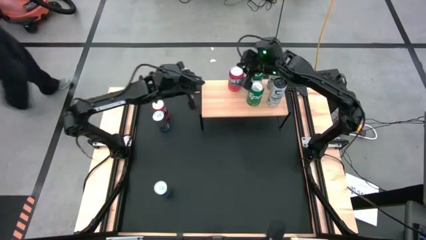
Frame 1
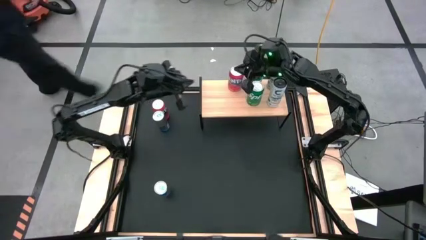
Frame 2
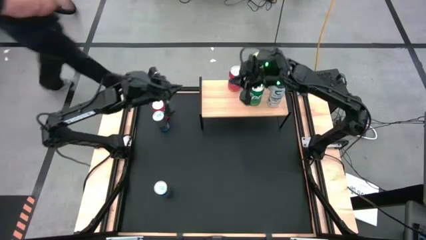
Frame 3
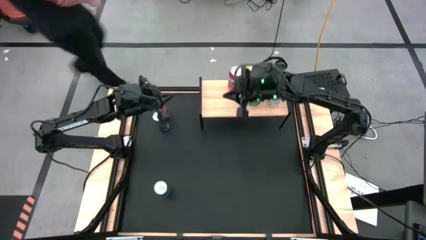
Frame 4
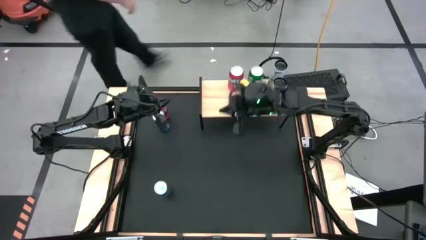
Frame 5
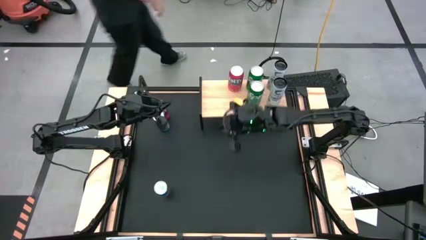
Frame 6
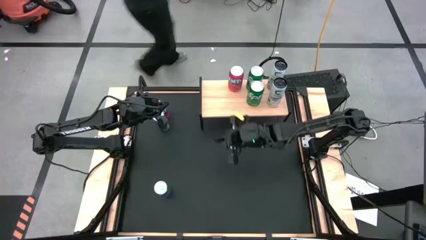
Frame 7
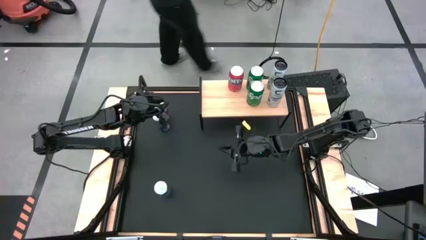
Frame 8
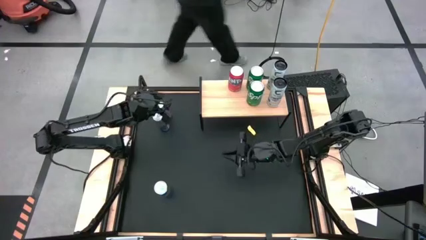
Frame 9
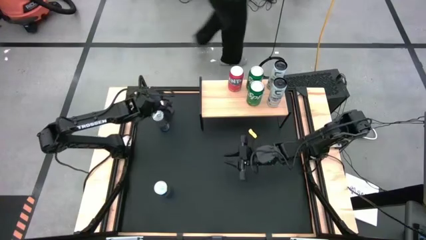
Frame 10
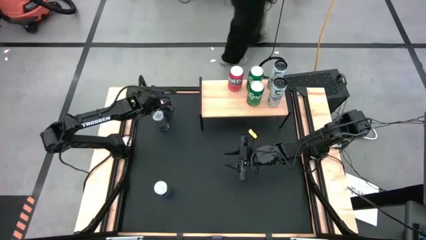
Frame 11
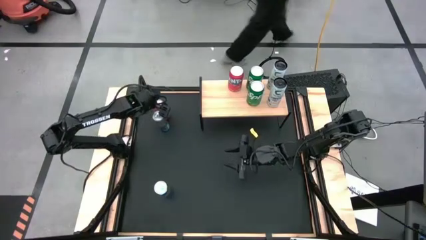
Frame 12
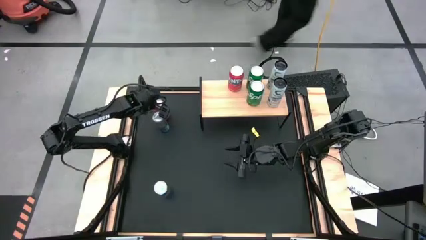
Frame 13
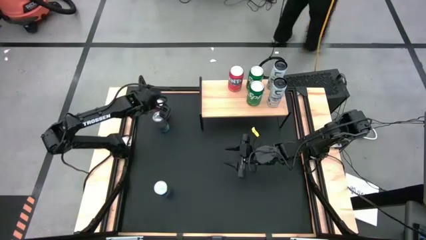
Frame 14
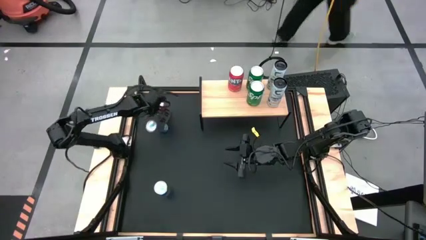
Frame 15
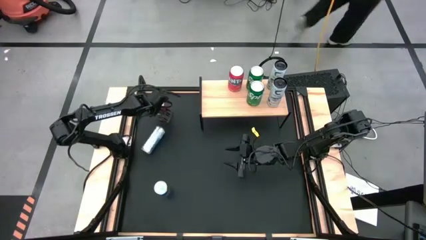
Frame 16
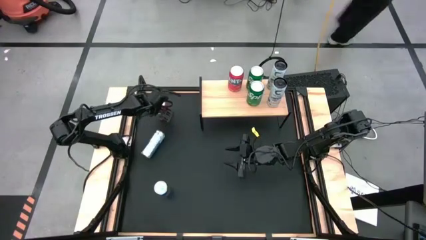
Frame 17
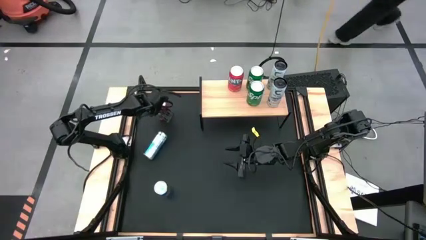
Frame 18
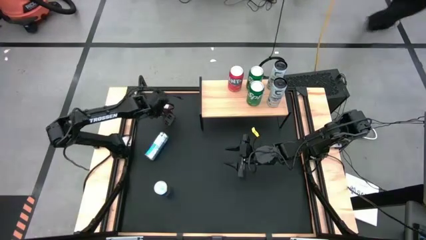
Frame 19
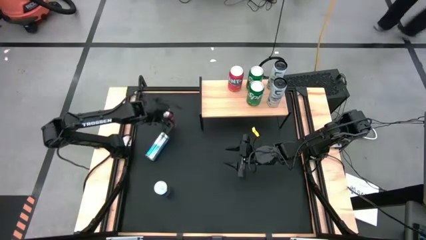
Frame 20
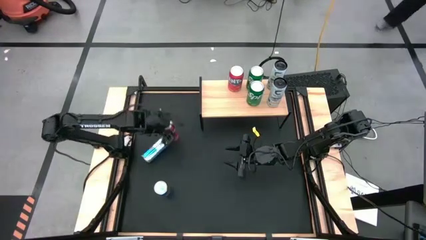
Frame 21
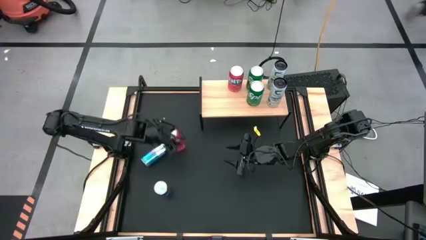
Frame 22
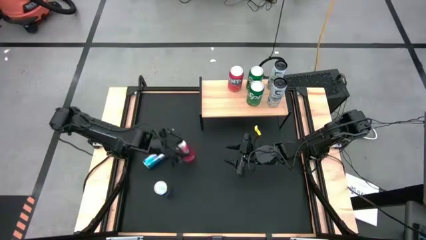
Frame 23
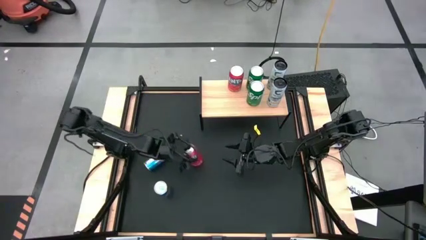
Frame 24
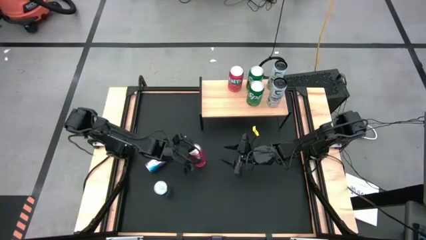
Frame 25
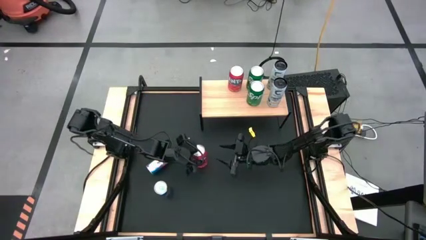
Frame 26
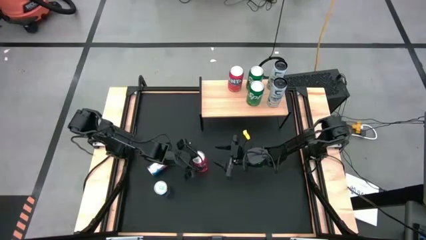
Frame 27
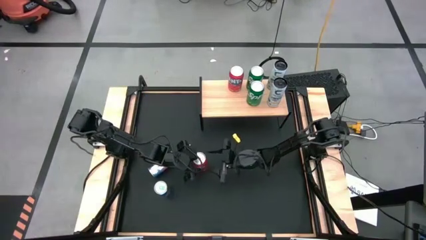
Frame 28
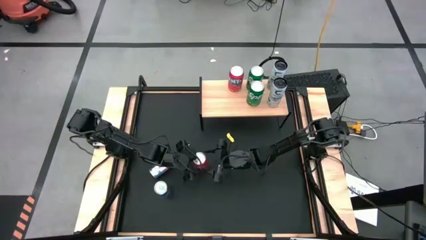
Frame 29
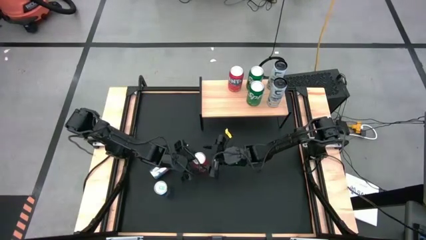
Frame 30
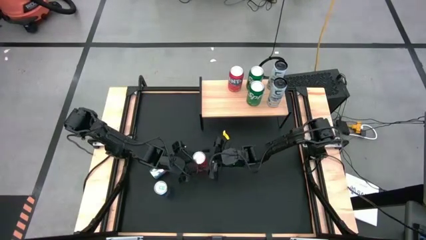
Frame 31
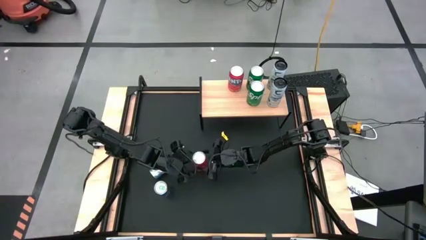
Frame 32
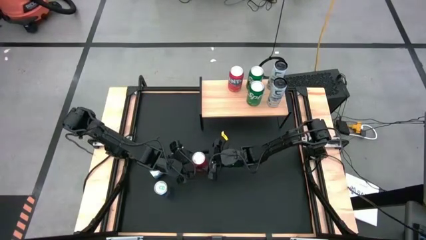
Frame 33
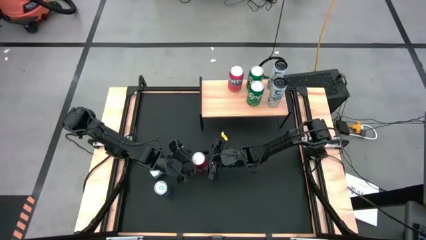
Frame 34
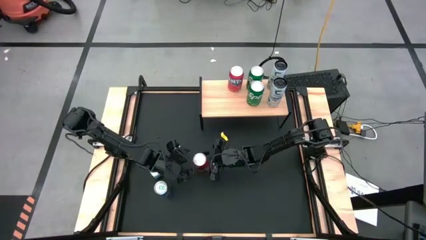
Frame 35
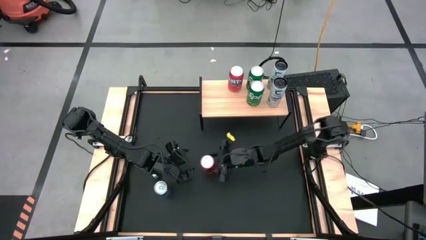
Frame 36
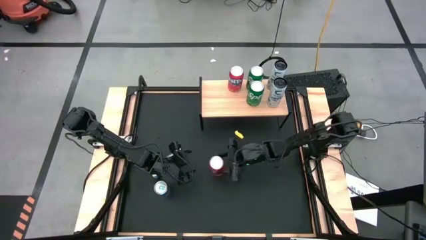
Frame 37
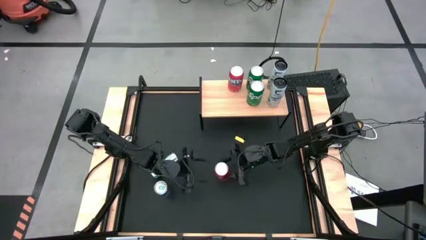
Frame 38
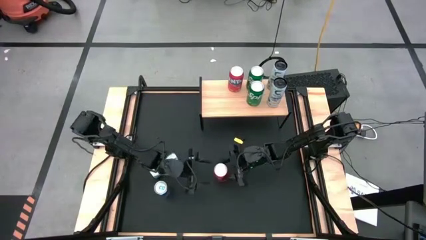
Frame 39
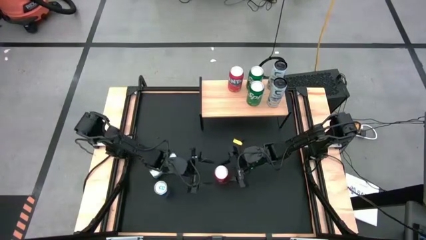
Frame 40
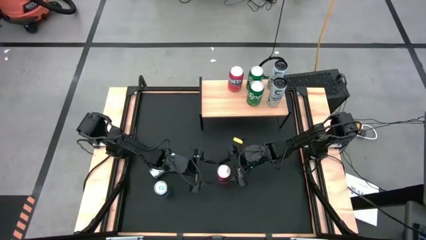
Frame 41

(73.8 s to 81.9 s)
Task: Place canned beverage on shelf
Move the orange soda can to the center of the table

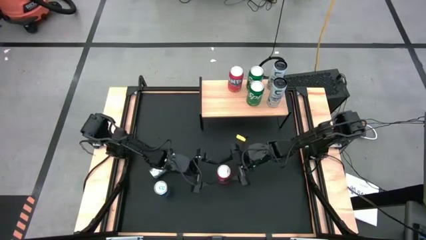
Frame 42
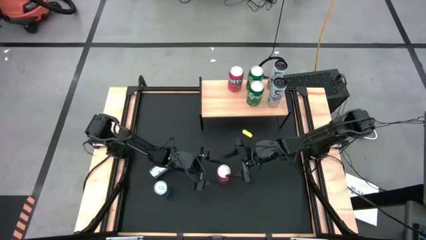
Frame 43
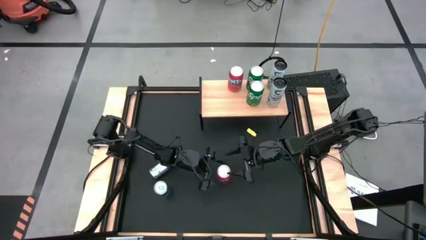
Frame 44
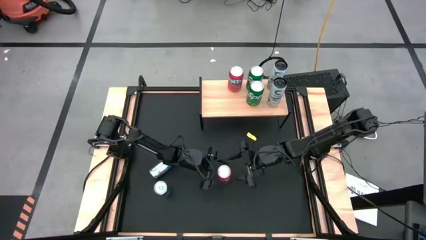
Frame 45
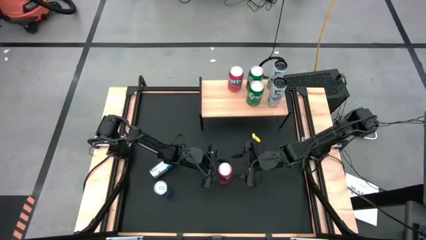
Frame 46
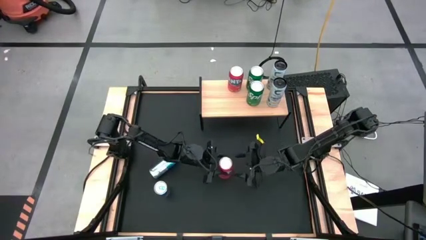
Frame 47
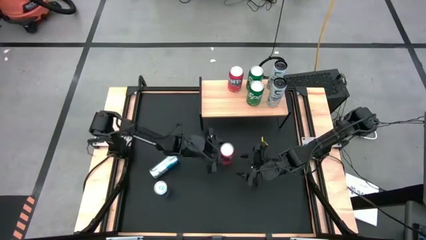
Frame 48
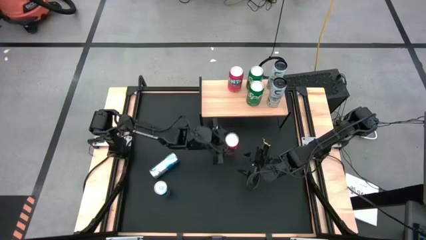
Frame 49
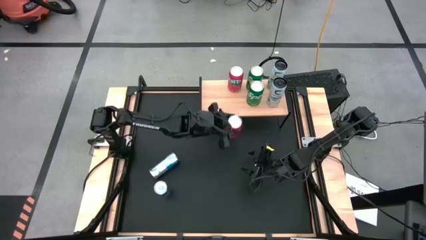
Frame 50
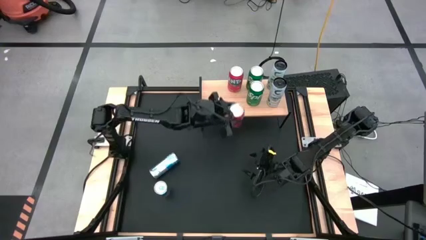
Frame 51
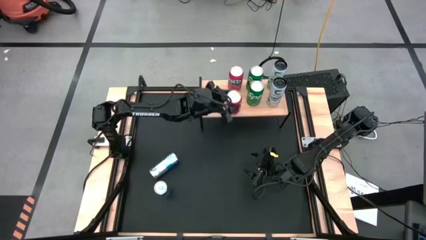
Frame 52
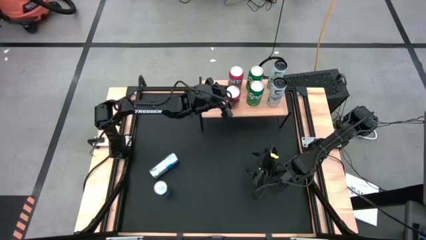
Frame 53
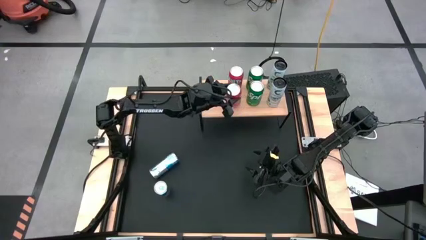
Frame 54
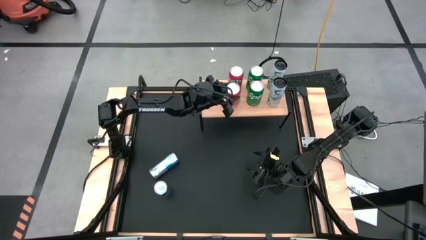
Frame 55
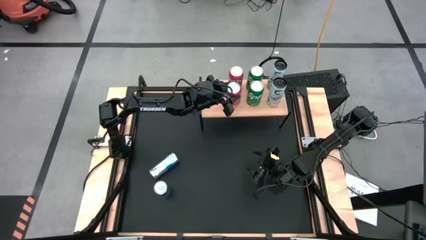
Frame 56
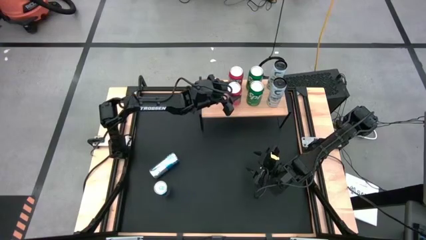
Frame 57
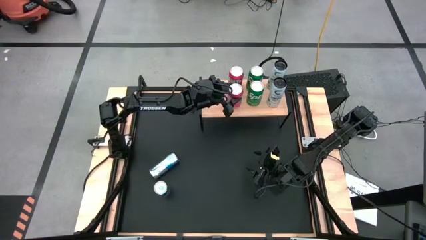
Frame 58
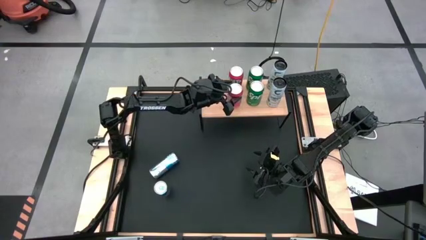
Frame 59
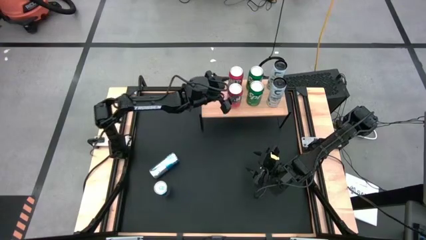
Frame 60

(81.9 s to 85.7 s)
Put the orange soda can on the shelf

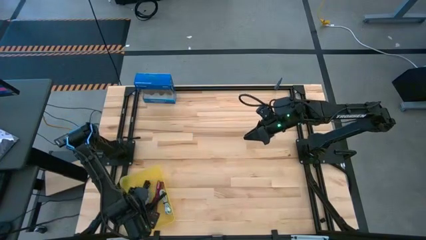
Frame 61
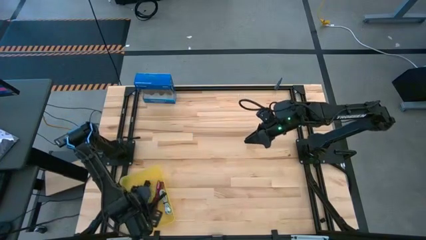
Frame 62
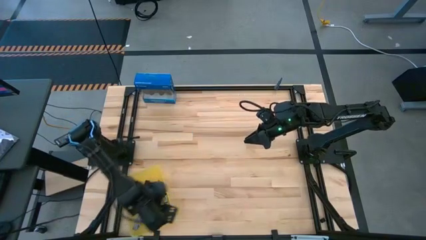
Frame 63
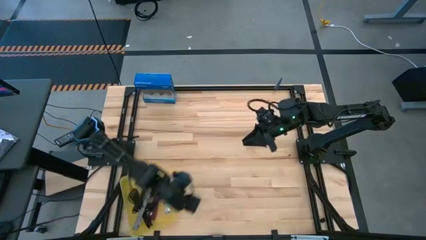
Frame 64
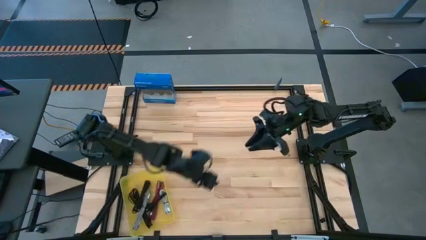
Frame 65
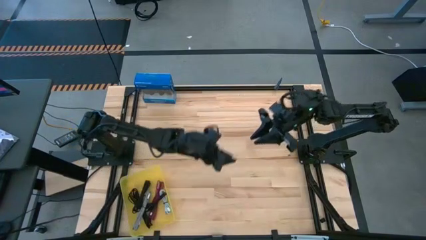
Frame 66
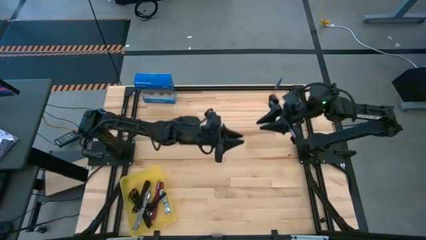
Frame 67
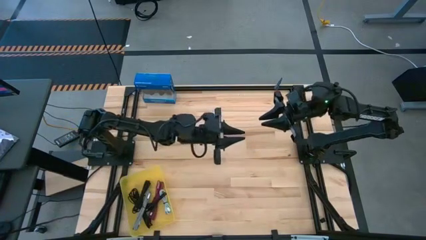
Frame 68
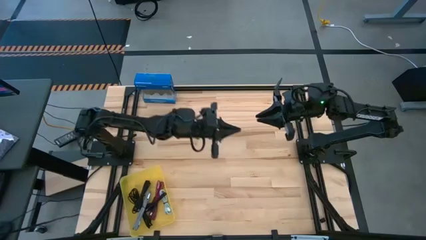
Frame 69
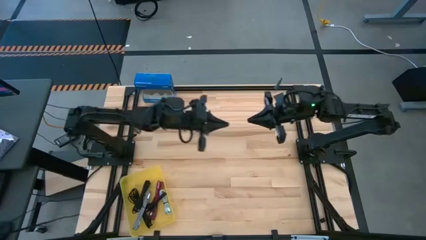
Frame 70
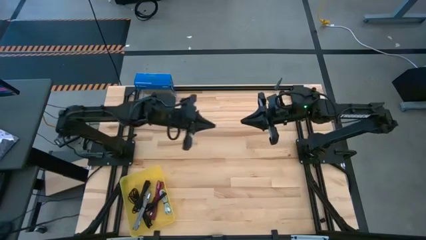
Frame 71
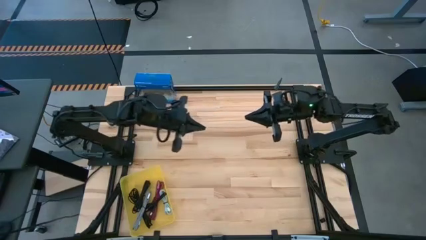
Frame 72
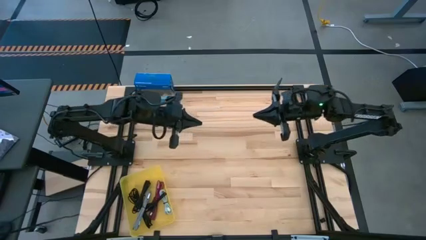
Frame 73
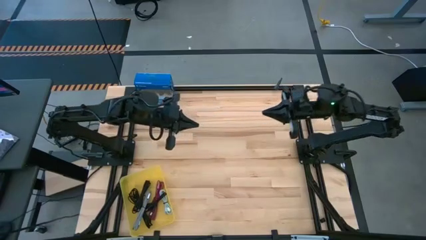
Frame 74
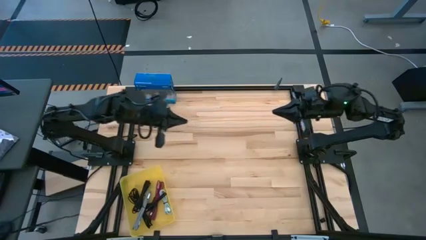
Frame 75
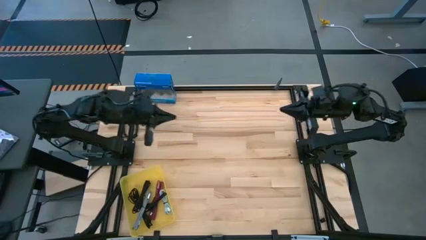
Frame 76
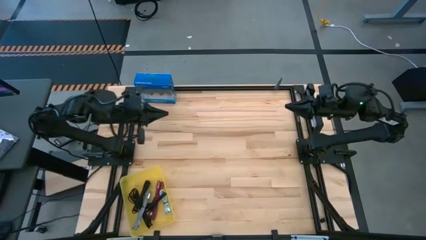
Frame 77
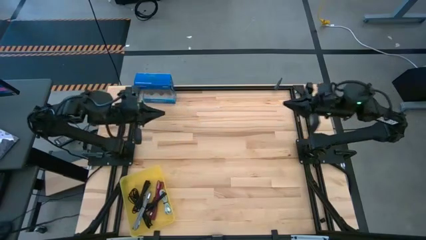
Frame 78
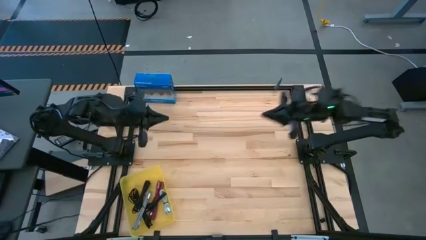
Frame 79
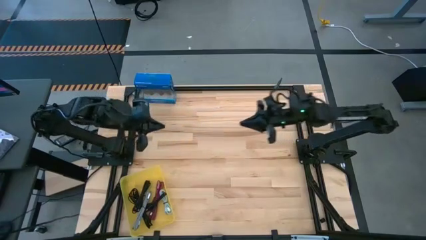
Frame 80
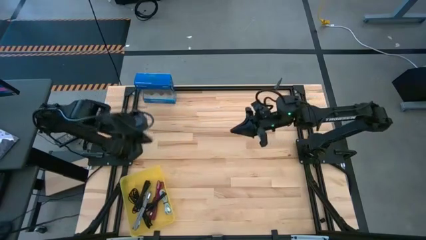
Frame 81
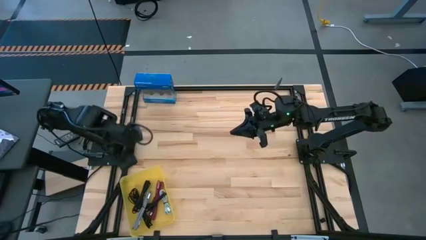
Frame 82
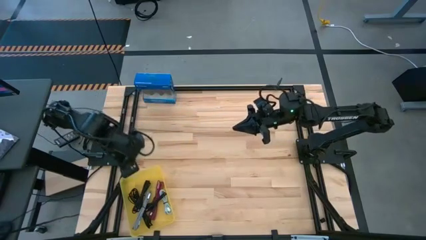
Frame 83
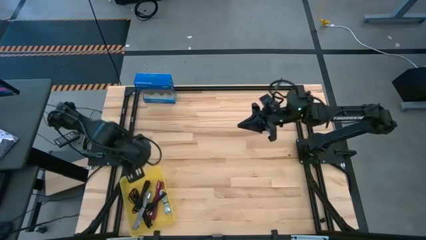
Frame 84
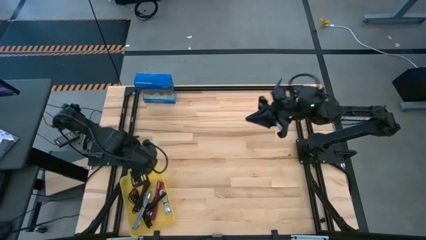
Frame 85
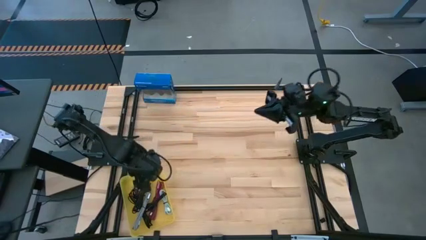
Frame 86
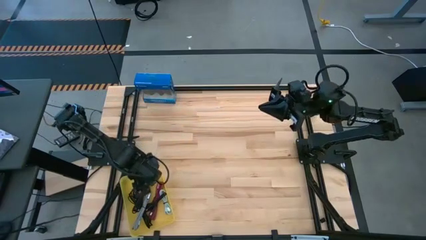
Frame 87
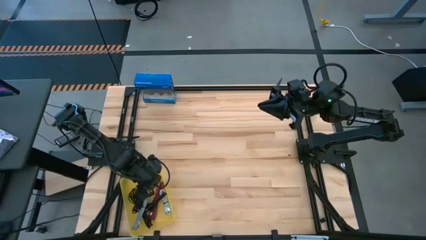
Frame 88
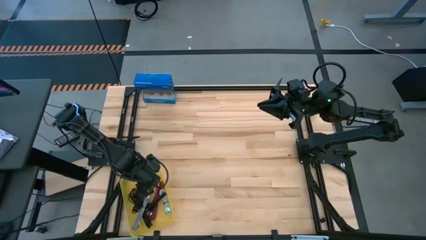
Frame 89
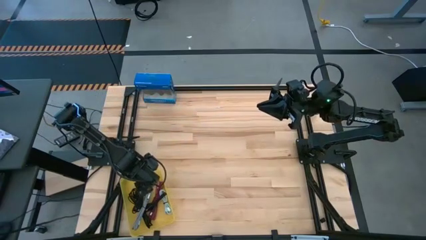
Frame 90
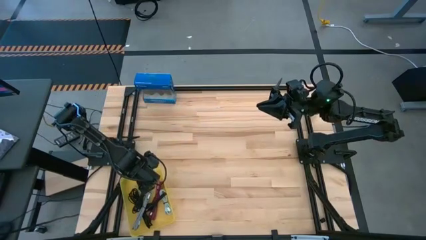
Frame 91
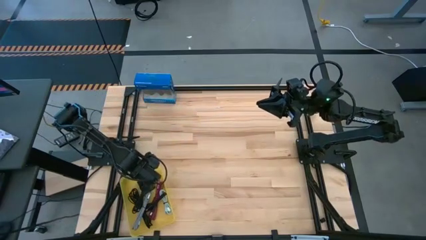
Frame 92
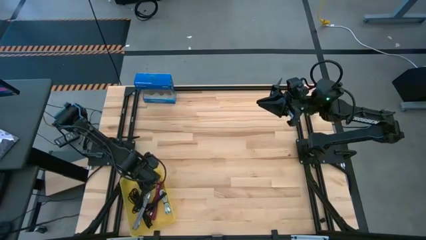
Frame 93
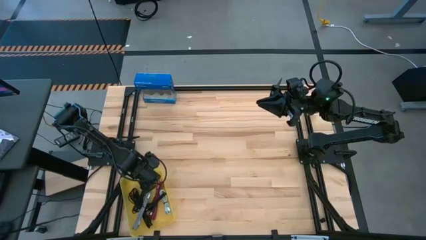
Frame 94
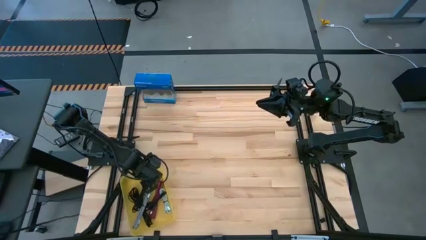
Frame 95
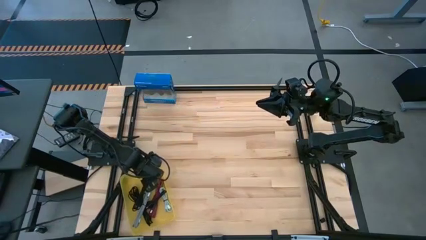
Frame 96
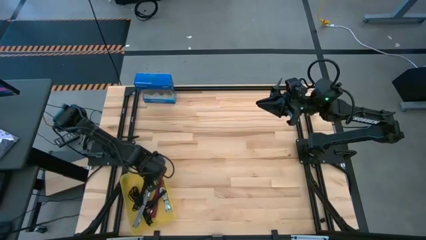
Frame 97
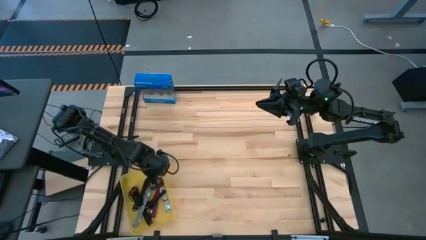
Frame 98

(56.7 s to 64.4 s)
Task: Pick and place USB-C Cables
Move the yellow bin to the center of the table
